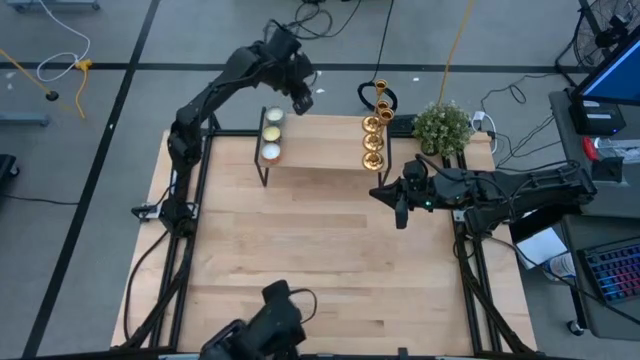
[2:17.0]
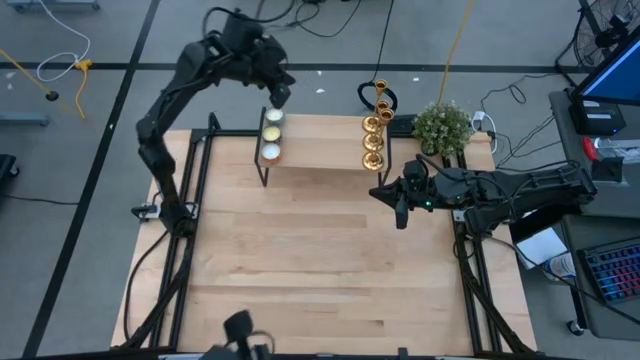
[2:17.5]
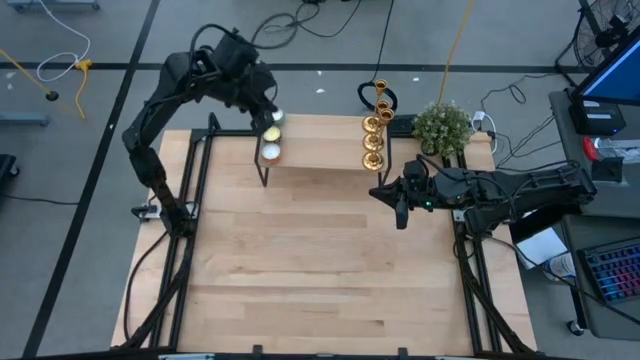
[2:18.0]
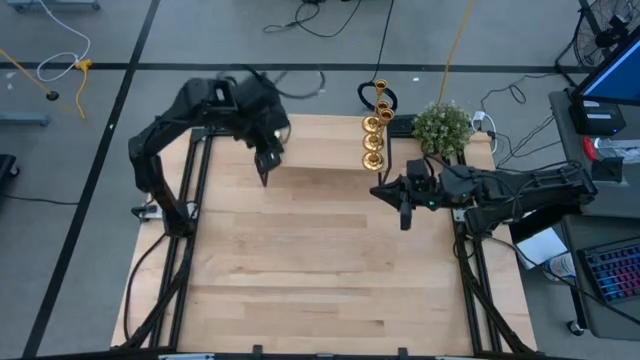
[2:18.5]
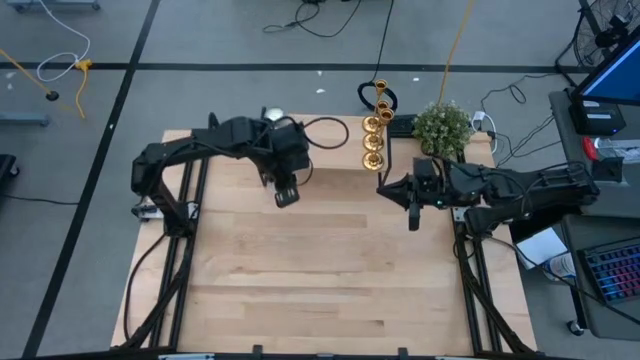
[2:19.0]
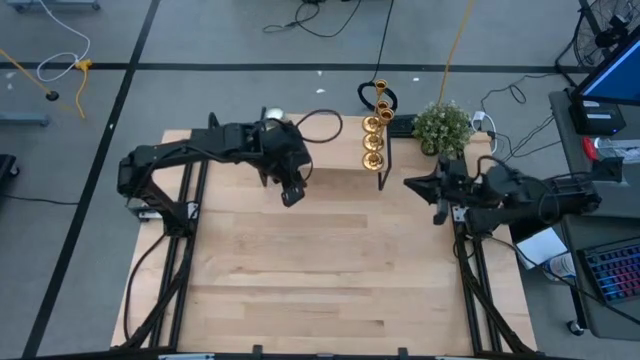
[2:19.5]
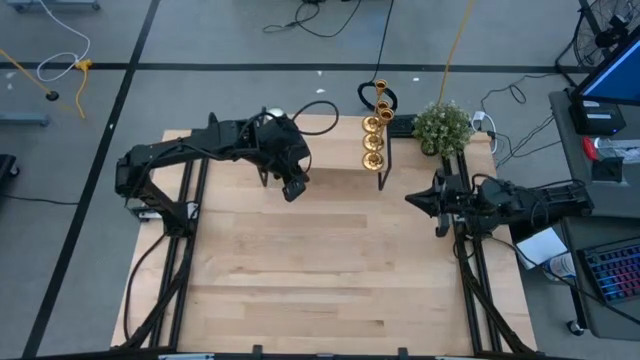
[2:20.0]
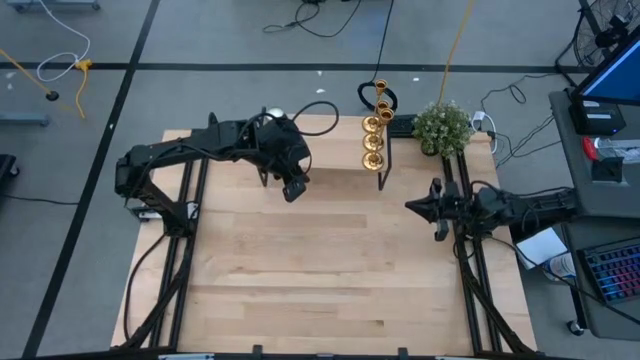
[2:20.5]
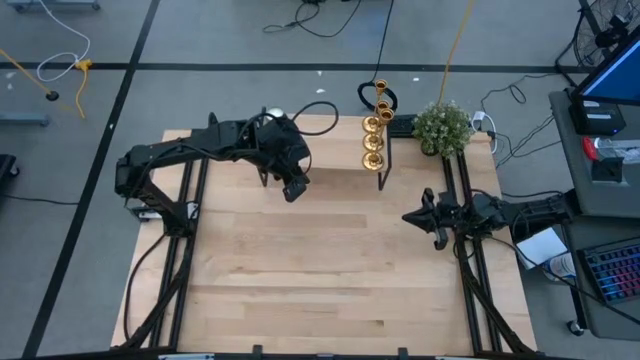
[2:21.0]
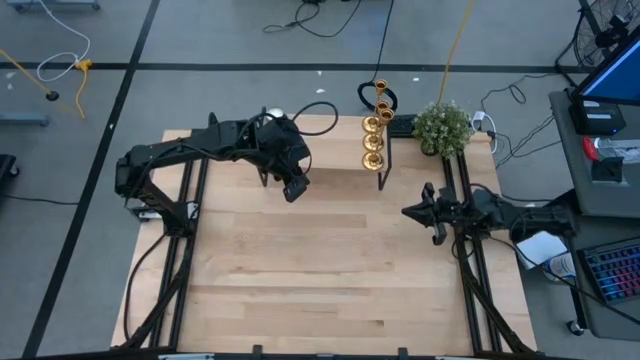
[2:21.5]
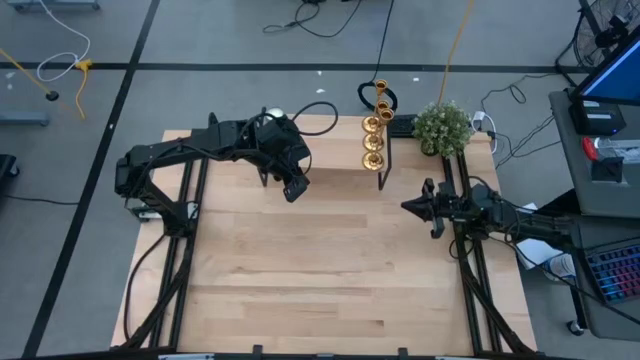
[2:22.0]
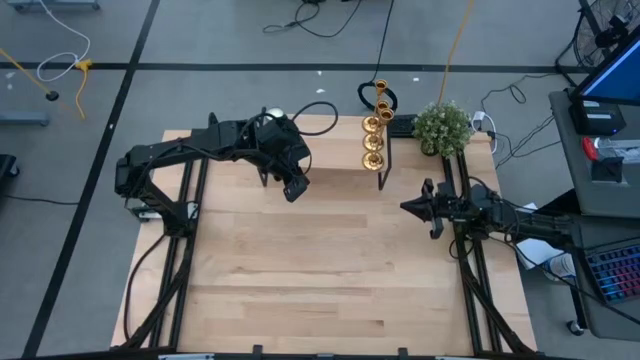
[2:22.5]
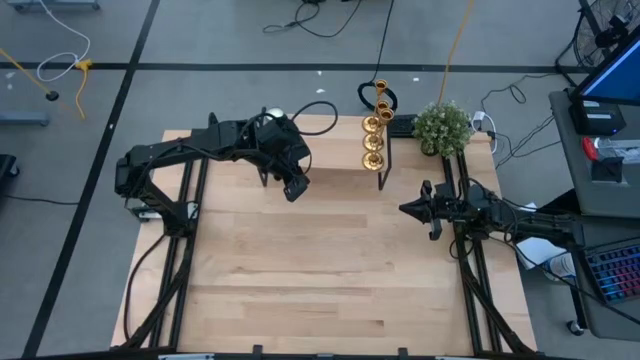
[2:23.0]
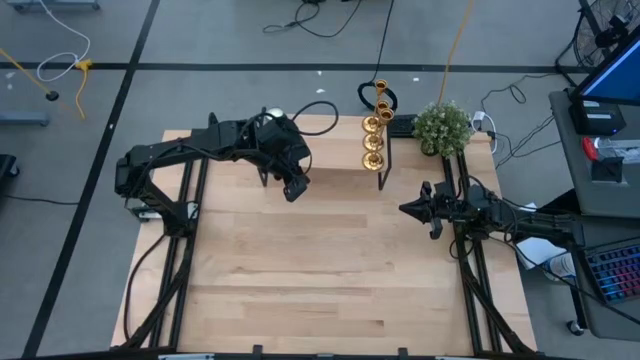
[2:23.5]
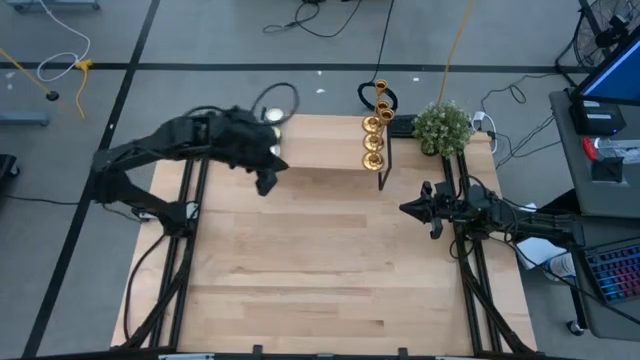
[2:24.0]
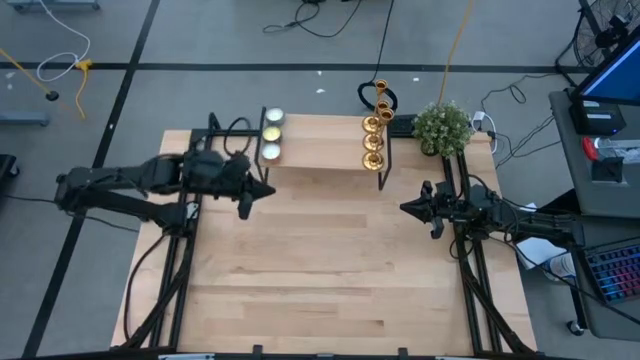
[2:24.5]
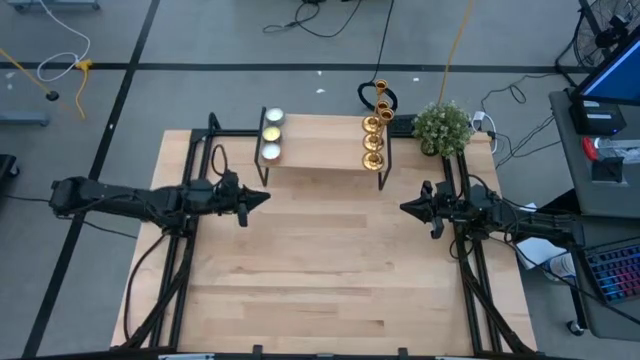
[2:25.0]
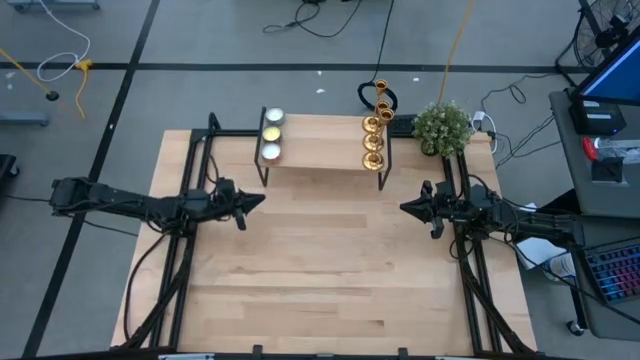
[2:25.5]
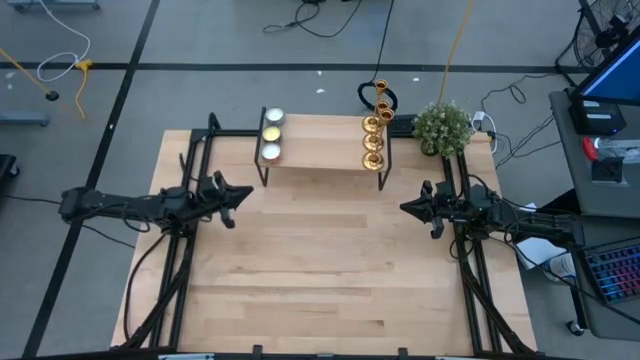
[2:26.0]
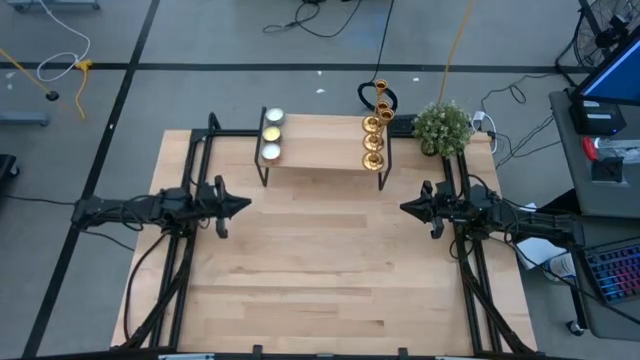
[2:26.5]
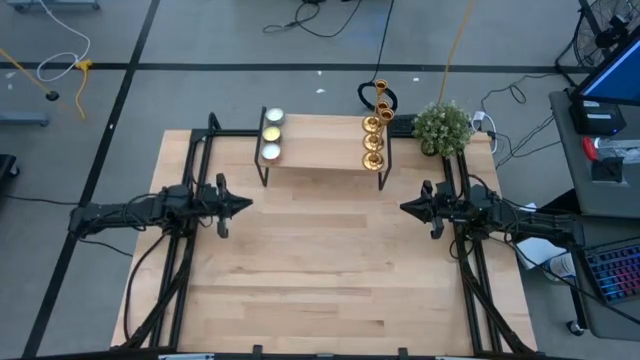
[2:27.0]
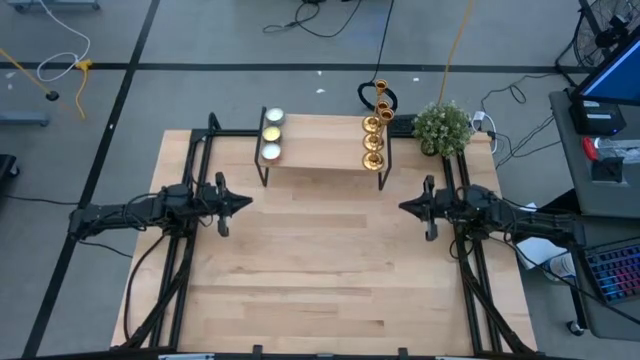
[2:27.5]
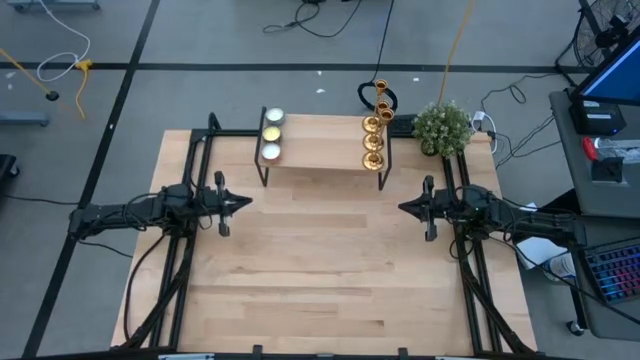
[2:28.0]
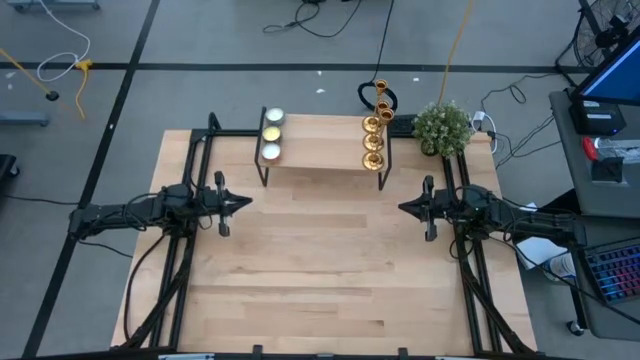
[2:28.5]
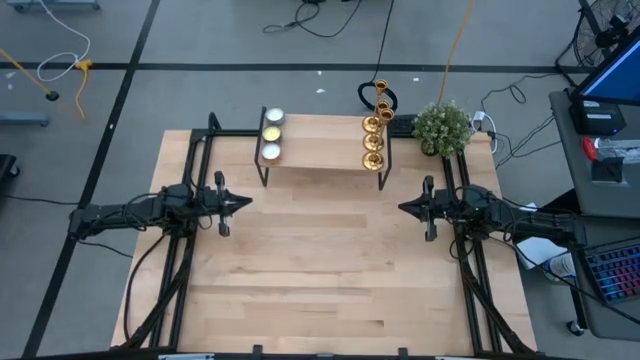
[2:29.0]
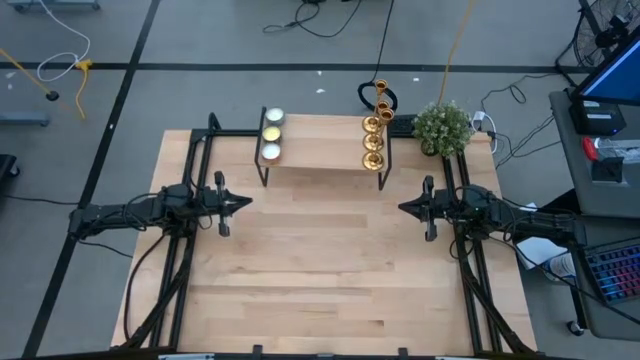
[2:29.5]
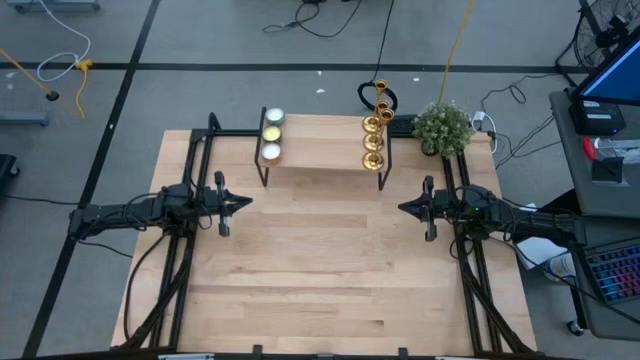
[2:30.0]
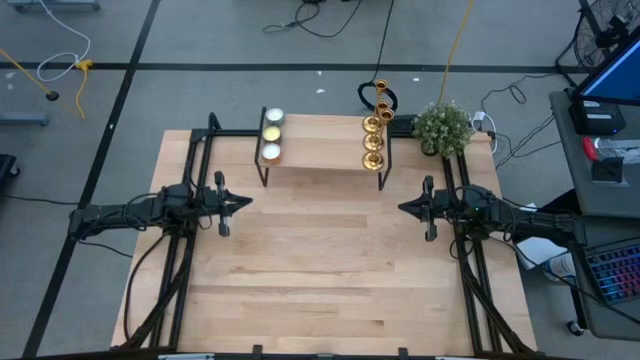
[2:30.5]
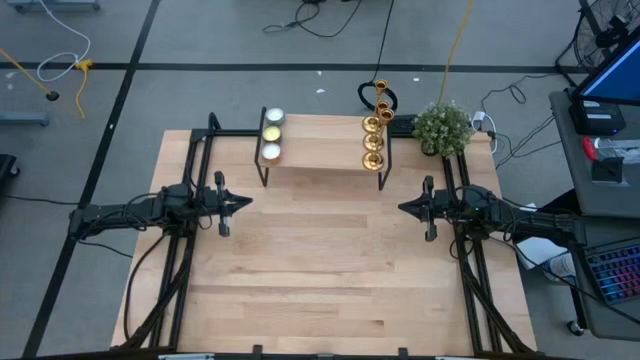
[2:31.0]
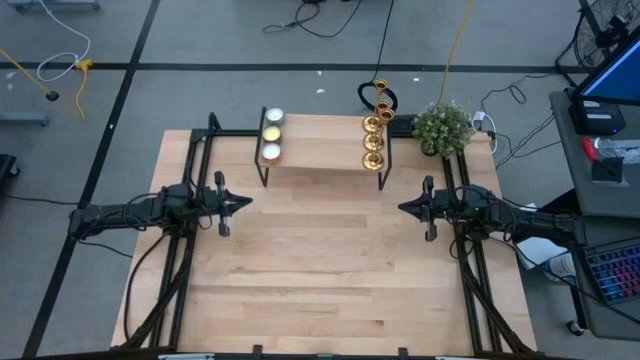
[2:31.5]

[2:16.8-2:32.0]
Task: Pick & Place candle stick holders
Return to Home Position

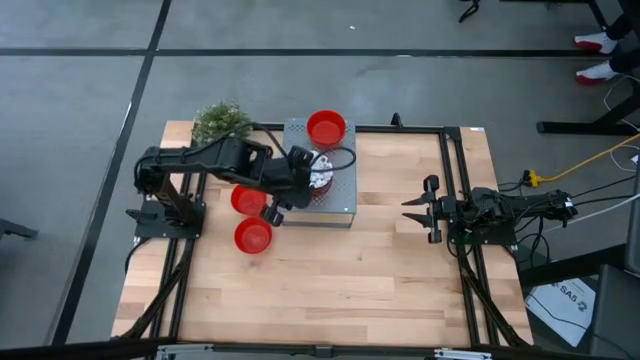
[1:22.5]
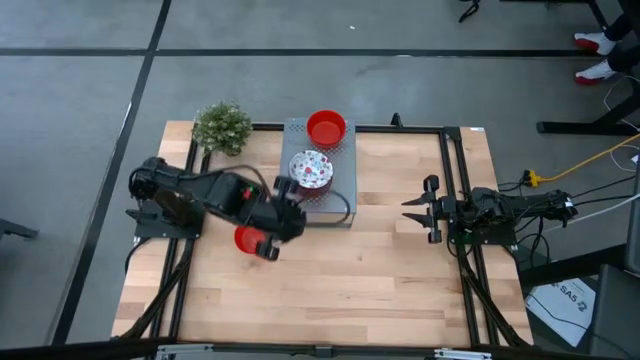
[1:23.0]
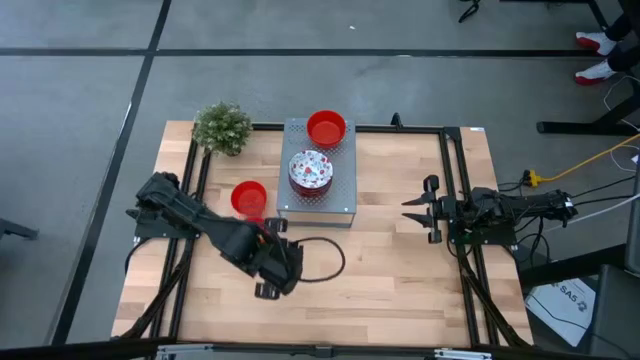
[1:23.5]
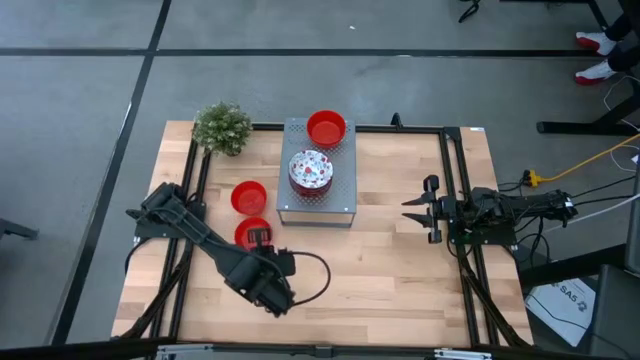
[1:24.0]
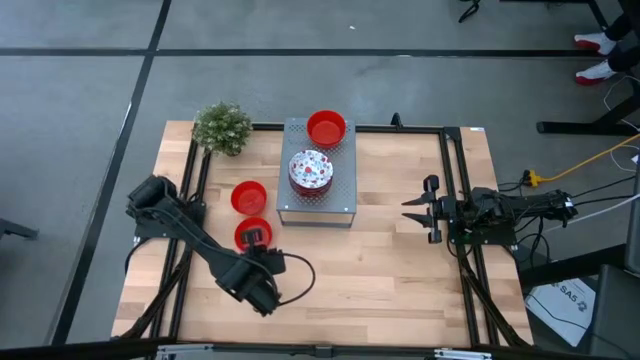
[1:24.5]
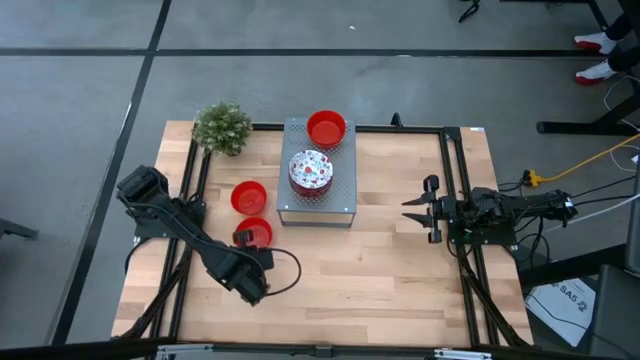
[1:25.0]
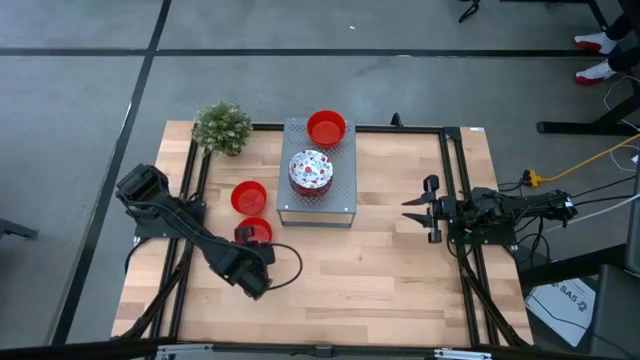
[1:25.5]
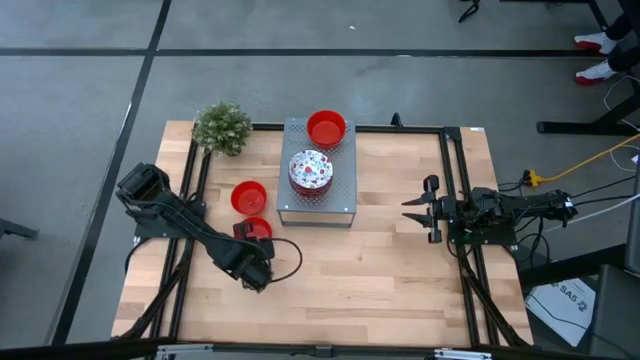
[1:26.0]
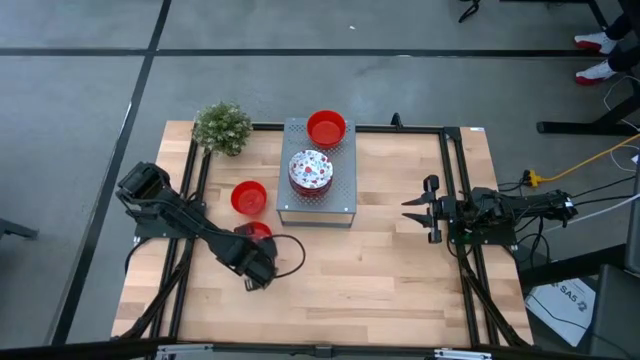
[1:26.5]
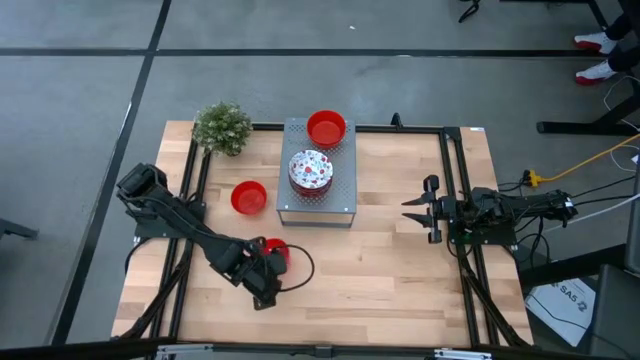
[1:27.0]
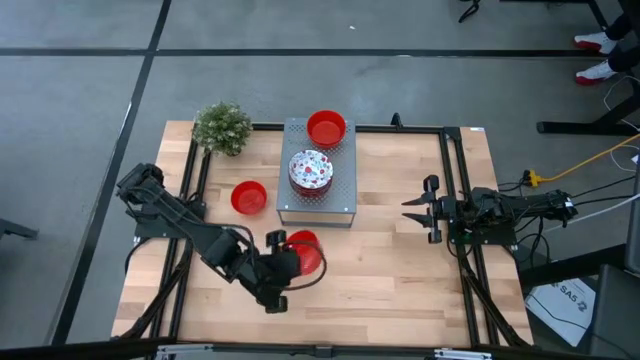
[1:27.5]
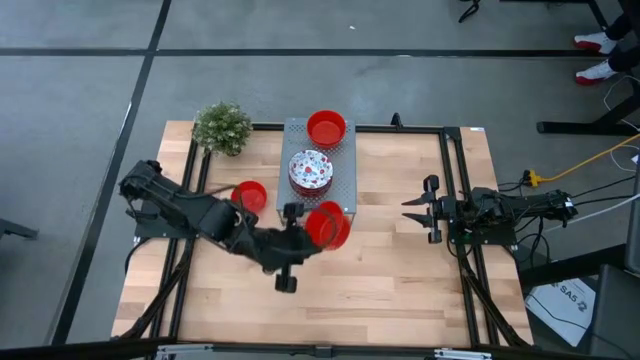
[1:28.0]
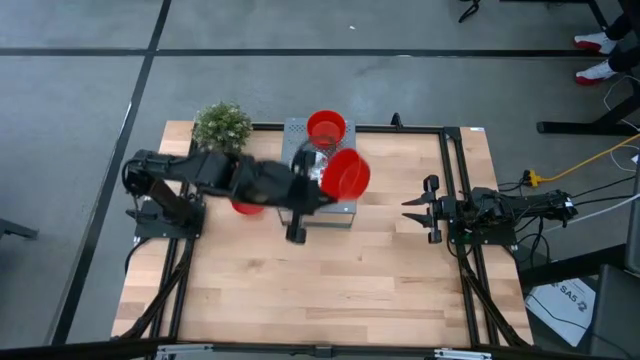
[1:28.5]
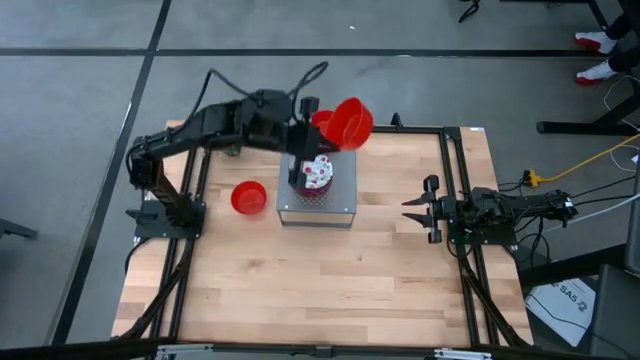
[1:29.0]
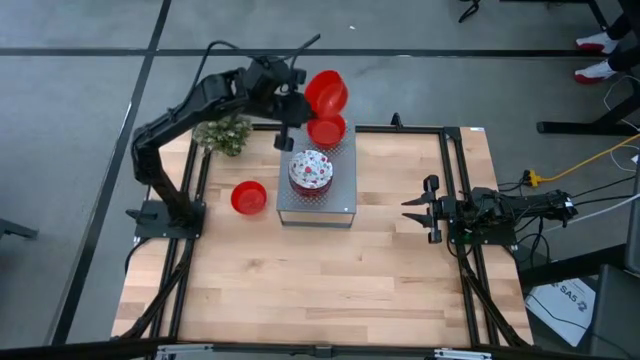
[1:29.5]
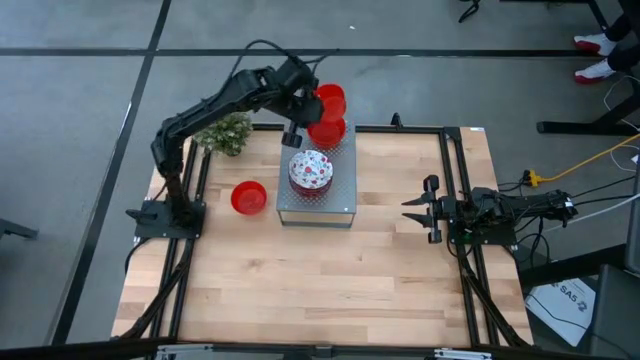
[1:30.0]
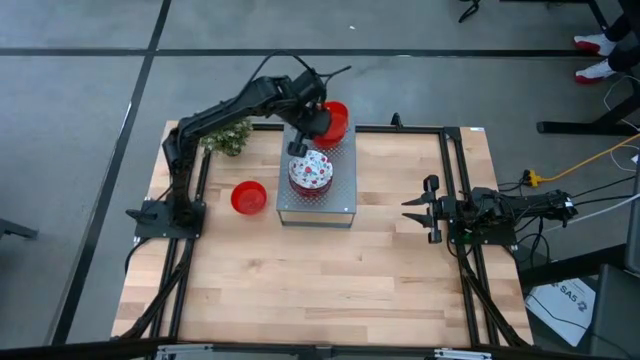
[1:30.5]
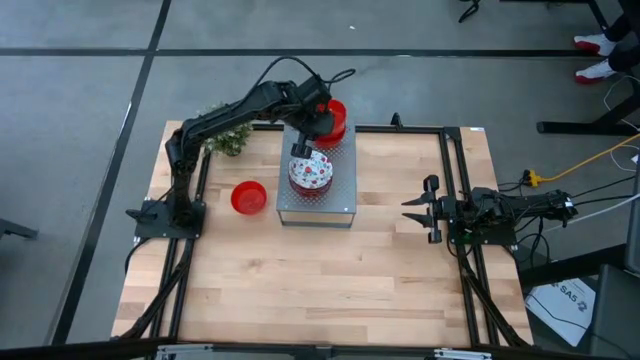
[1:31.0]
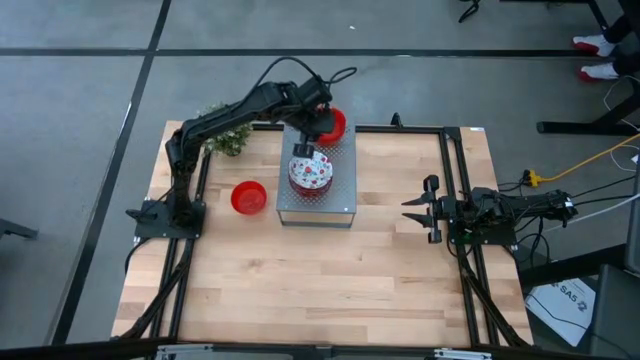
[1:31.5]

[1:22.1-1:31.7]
Task: Pick & Place Mini bowls
Stack the red bowl on the red bowl on the shelf
